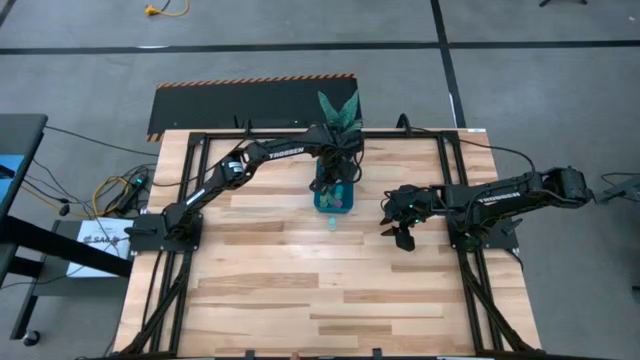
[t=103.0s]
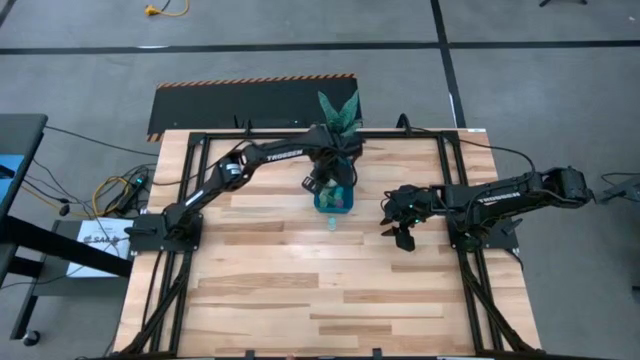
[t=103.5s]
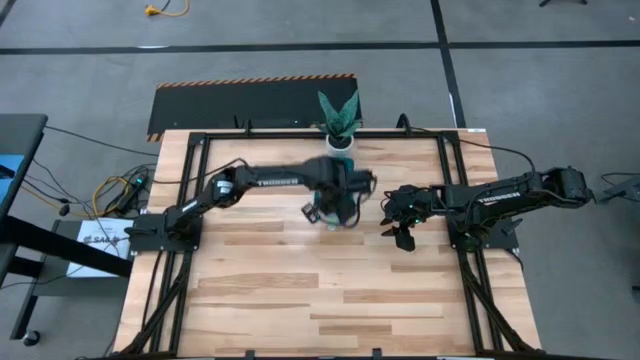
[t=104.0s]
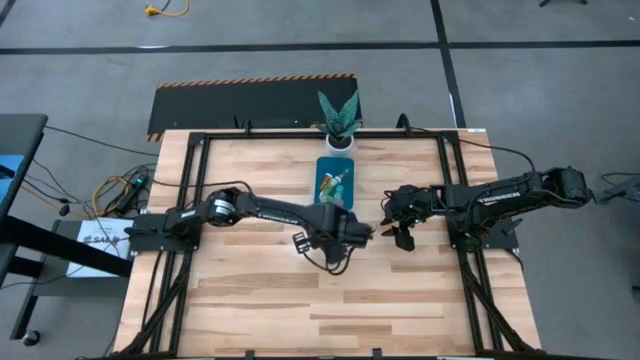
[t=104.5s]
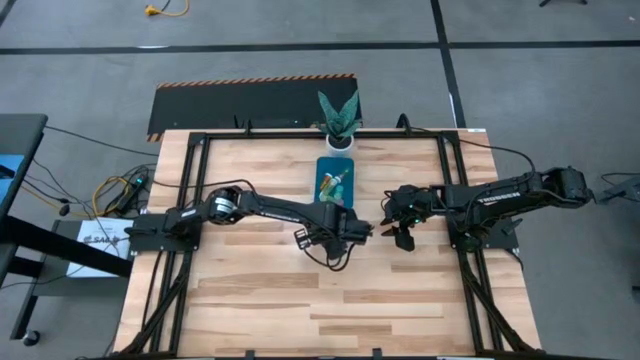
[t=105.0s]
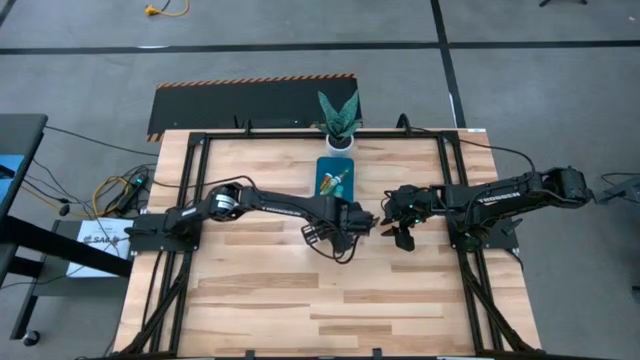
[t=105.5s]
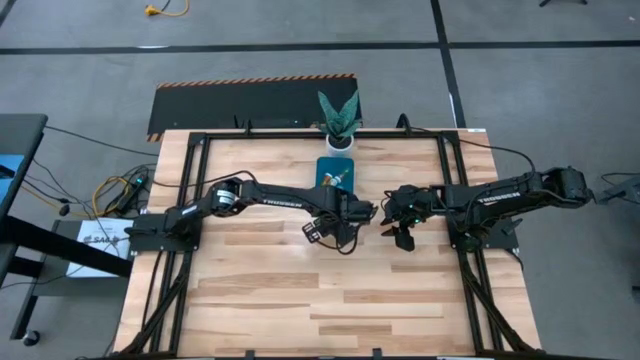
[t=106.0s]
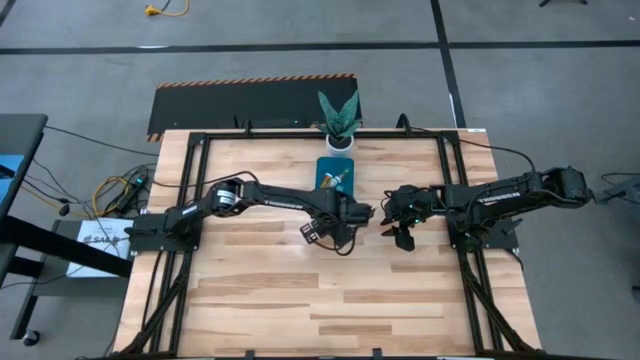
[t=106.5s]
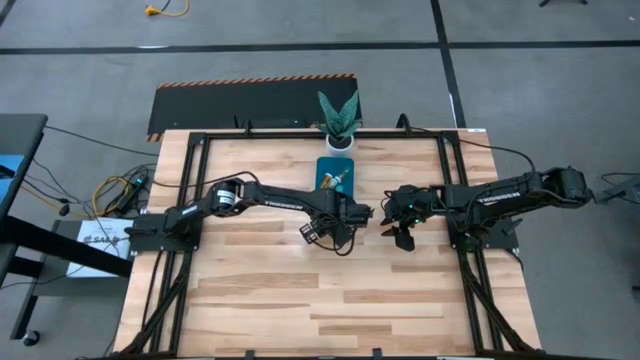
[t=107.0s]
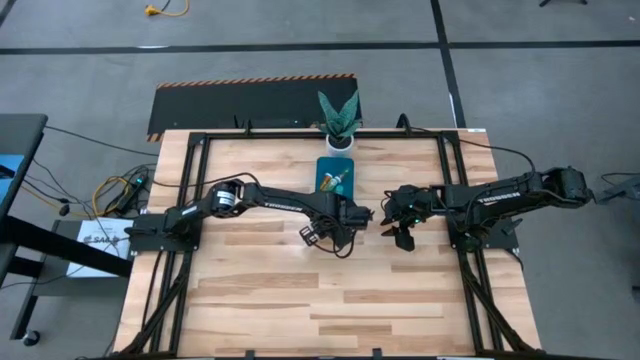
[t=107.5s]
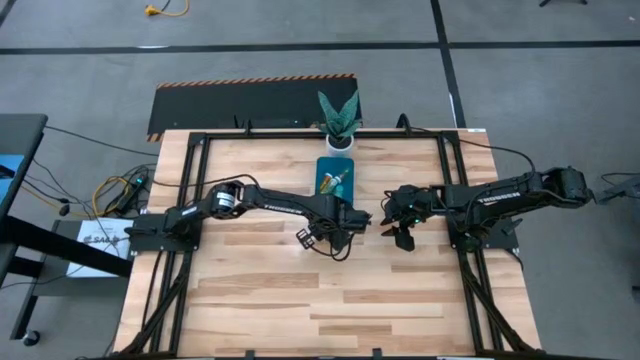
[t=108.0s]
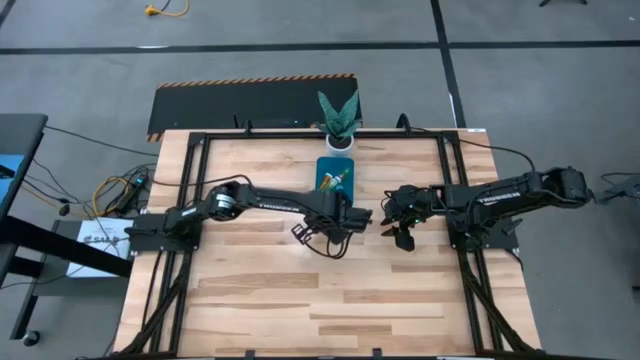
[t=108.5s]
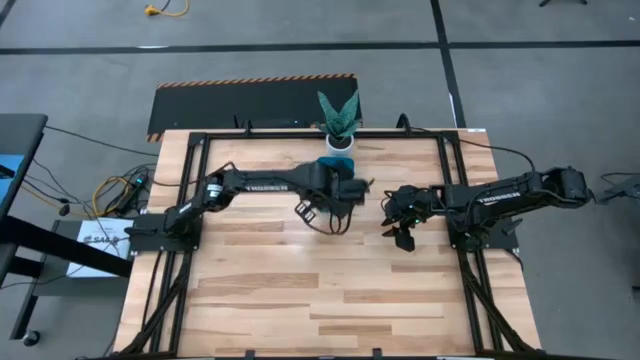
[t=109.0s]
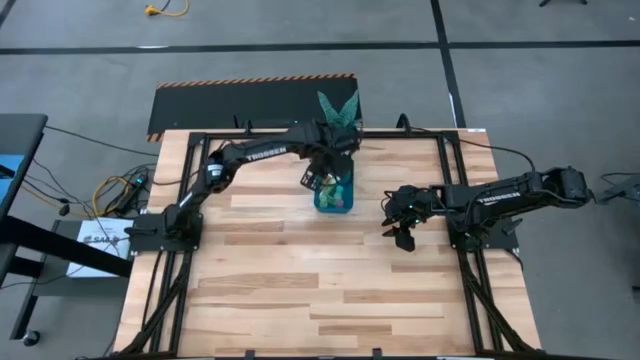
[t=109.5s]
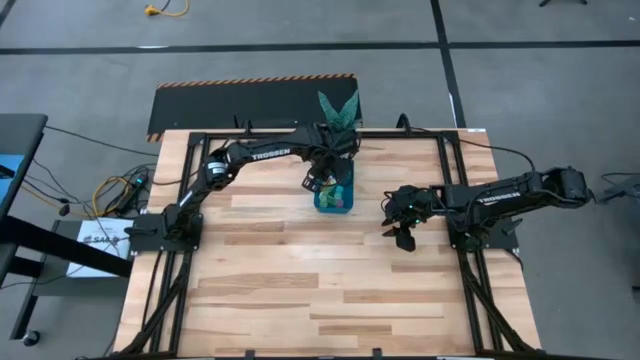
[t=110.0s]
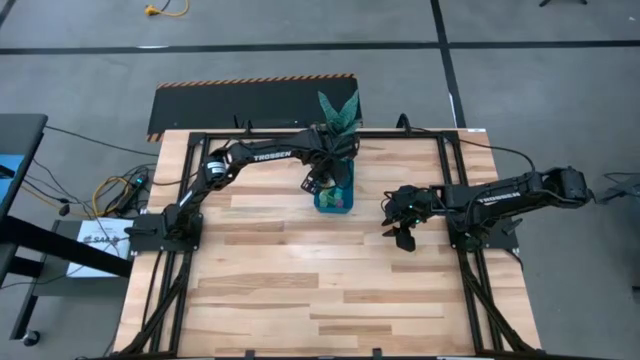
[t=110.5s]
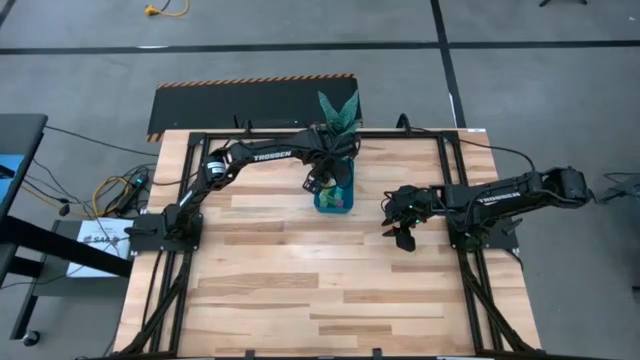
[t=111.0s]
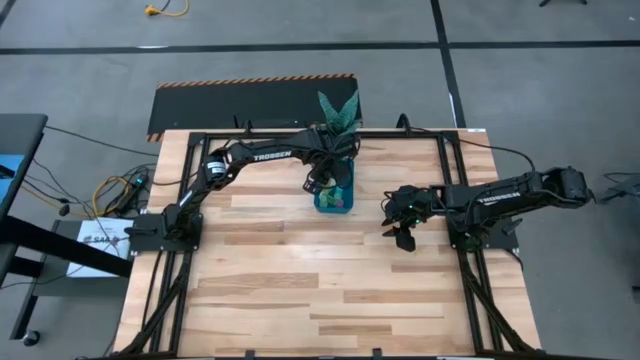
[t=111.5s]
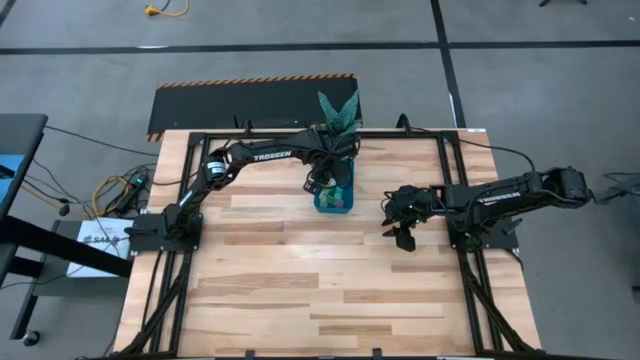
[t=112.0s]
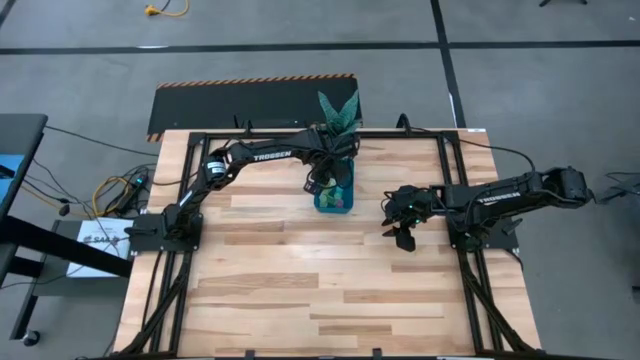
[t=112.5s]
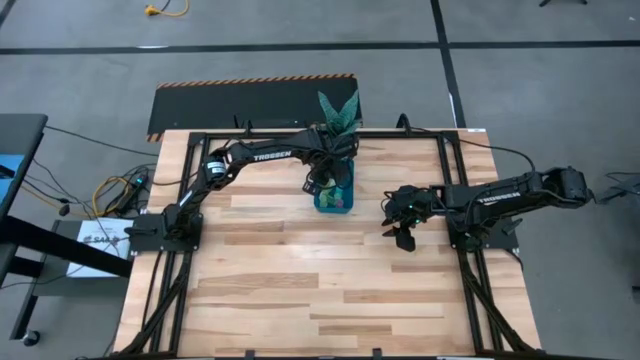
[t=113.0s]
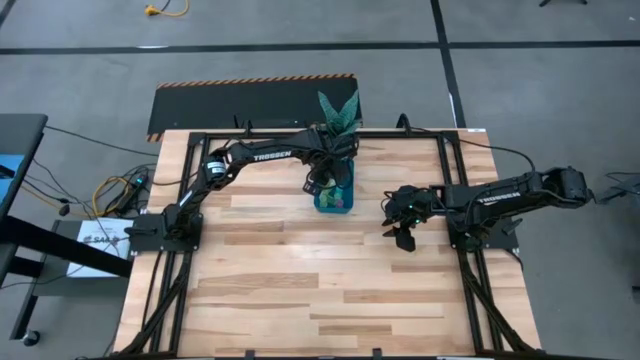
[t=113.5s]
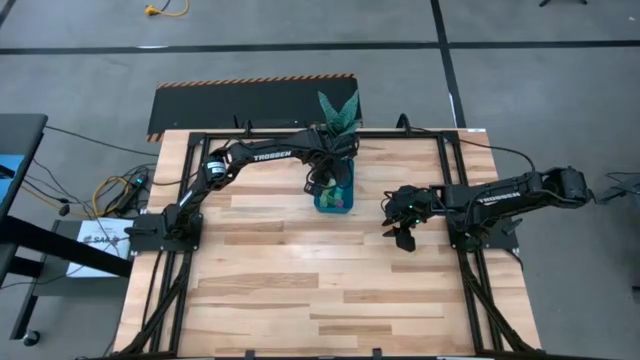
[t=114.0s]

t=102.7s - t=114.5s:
Task: Pick and place pill bottles into a basket
Put the blue pill bottle into the blue bin

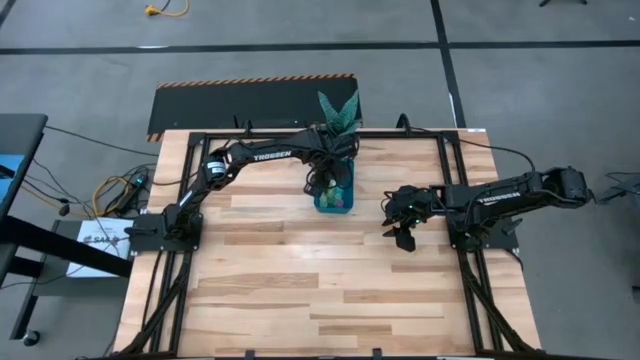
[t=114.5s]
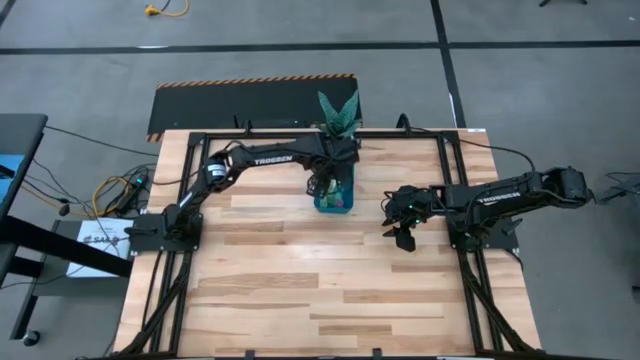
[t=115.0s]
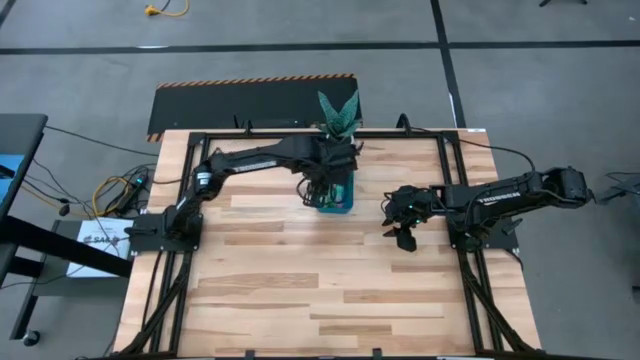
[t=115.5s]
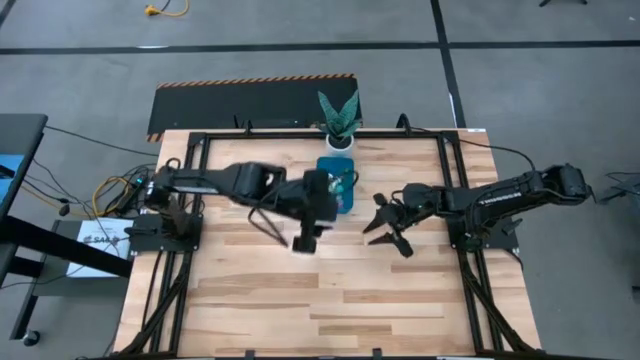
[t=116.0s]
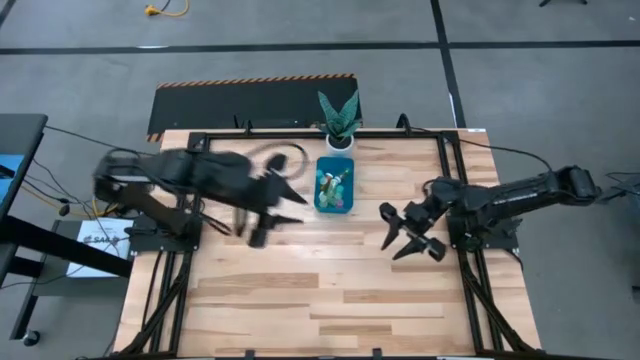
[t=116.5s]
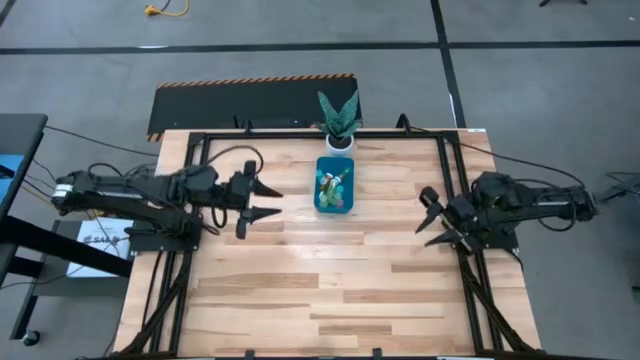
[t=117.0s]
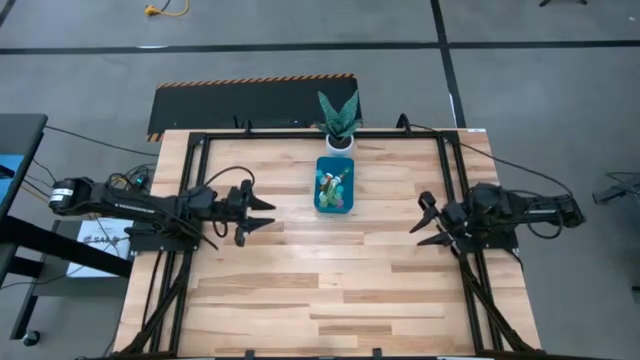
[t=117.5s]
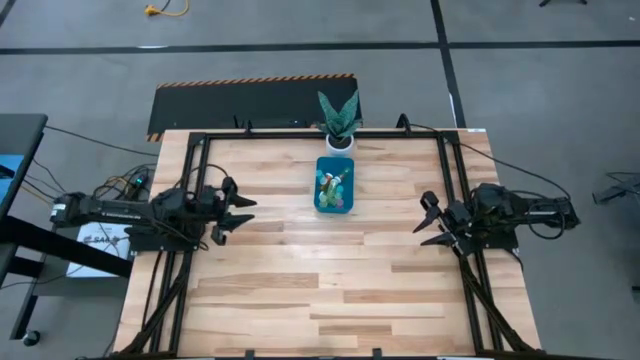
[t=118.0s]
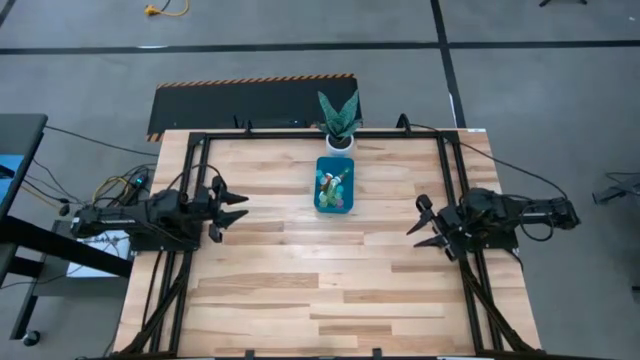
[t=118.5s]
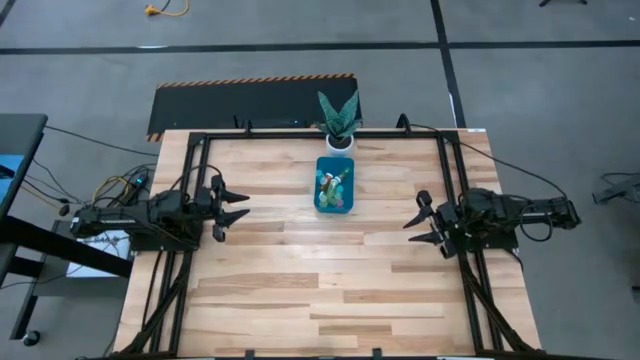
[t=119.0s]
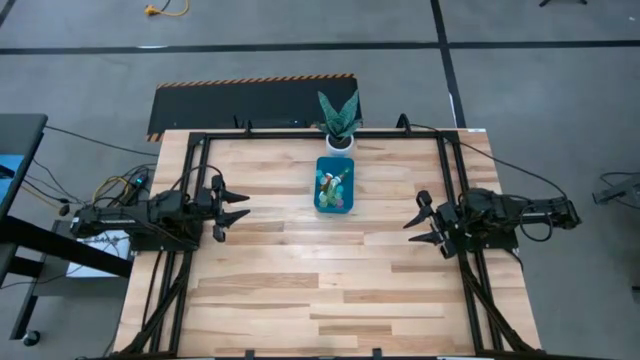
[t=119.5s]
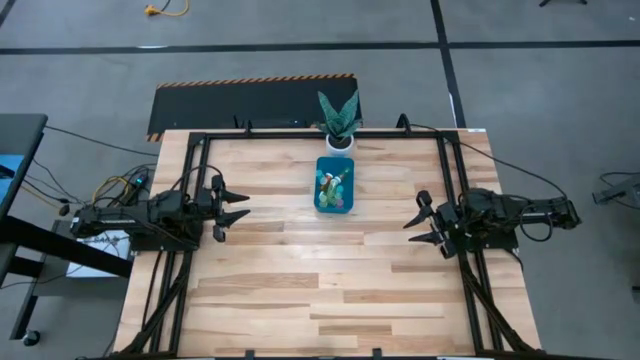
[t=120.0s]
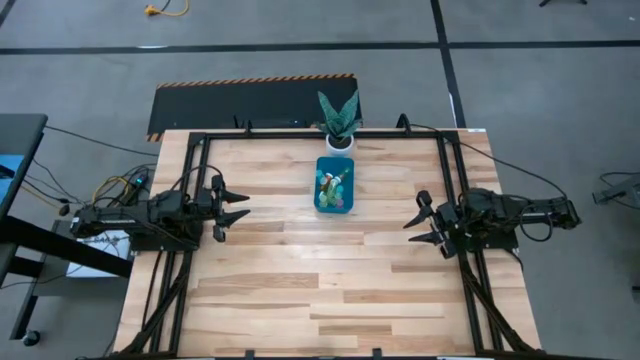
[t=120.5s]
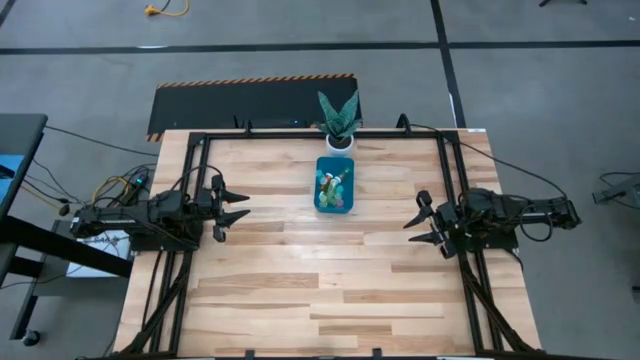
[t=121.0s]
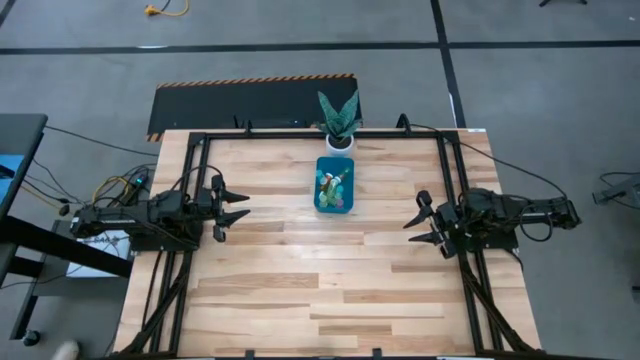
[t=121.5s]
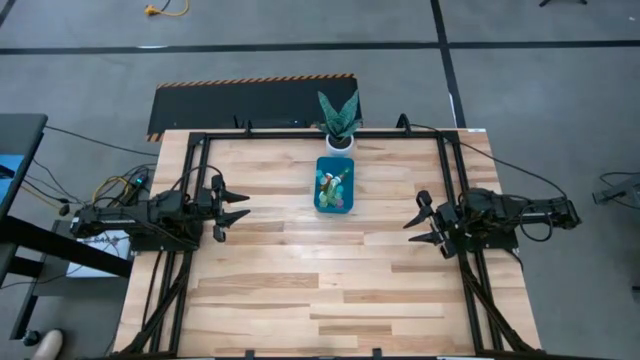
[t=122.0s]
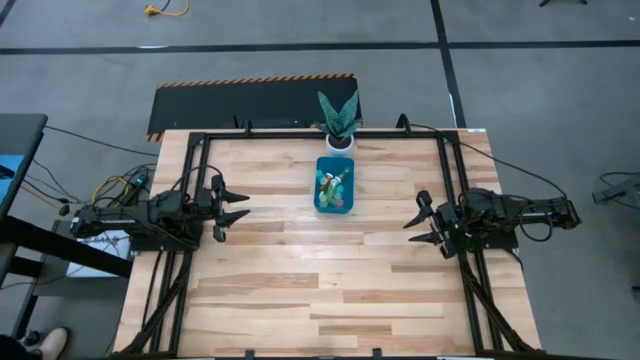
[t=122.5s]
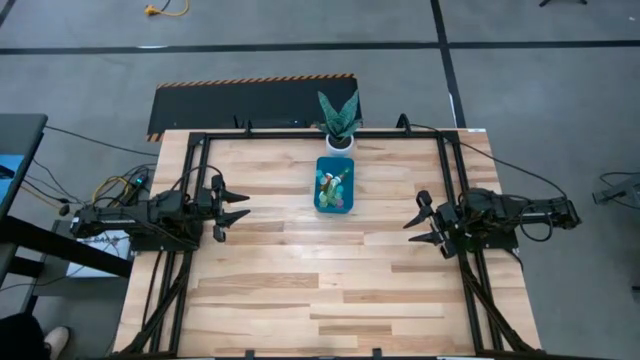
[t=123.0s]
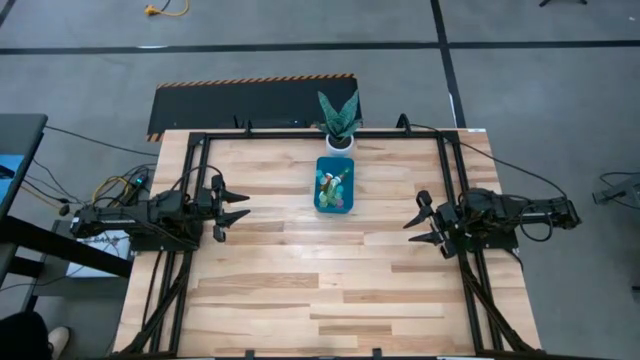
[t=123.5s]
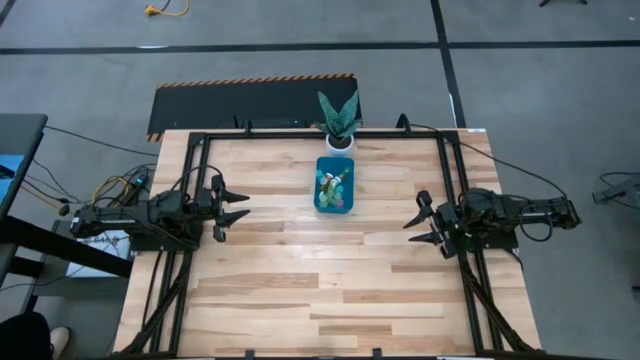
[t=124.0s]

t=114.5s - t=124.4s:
Return to Home Position
